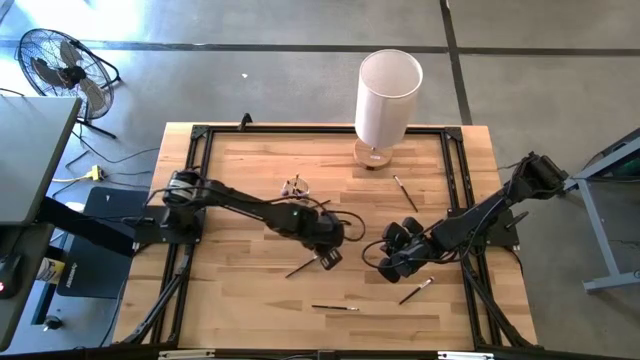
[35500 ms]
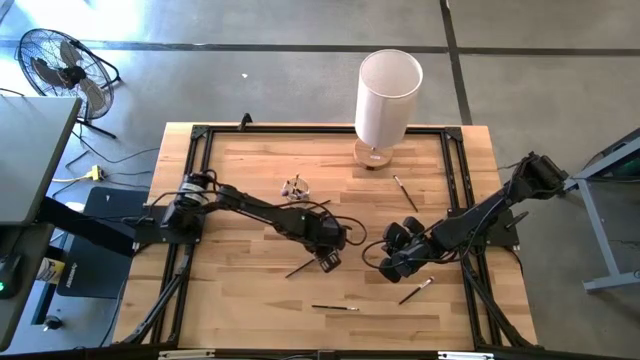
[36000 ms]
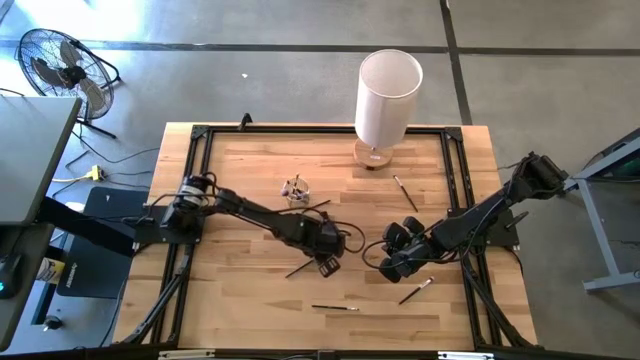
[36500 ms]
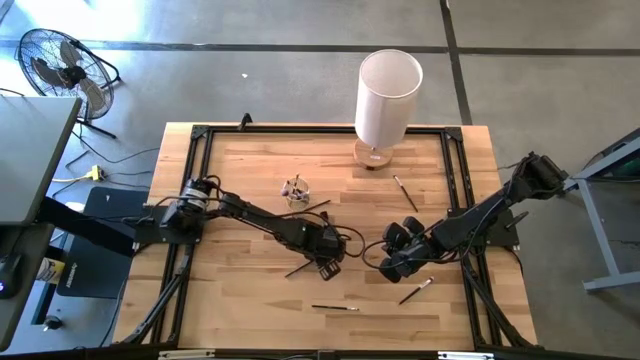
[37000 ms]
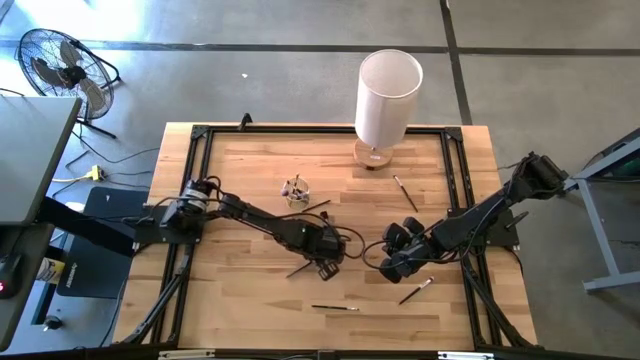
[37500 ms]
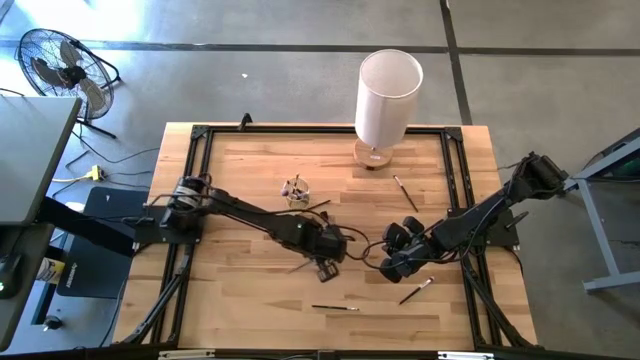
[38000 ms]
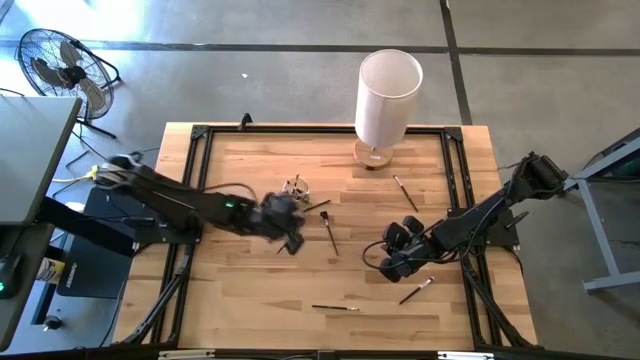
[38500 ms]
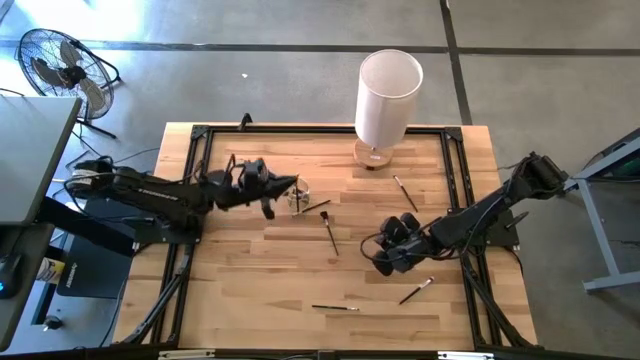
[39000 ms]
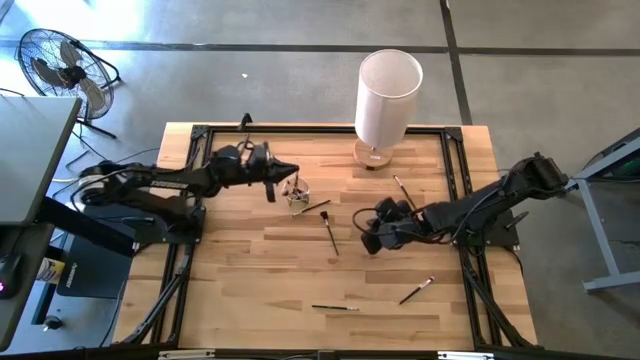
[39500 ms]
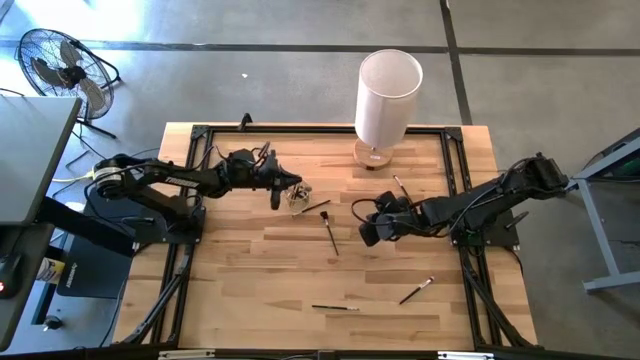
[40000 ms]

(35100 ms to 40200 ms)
Task: Put items in baskets/containers
Put the black liner brush into the yellow holder

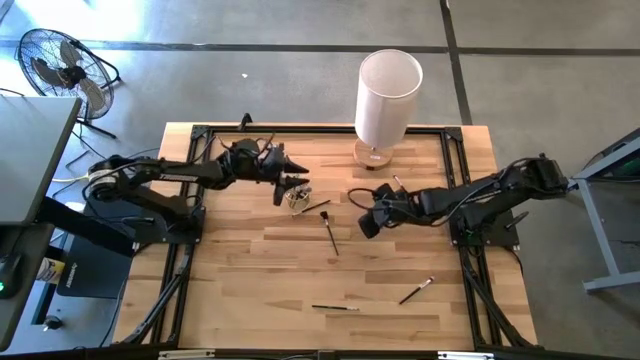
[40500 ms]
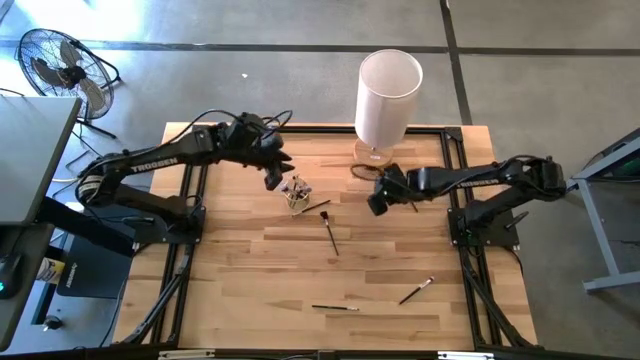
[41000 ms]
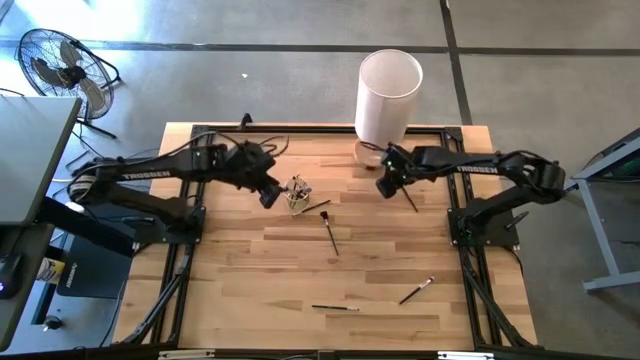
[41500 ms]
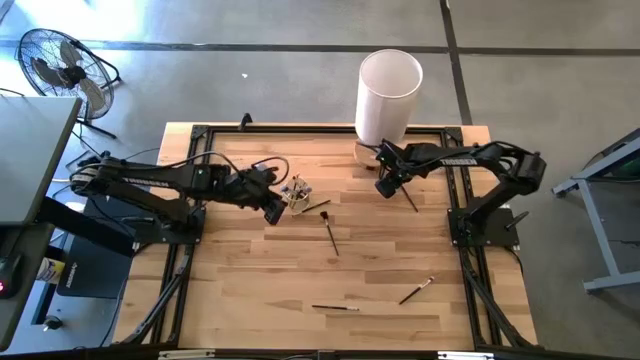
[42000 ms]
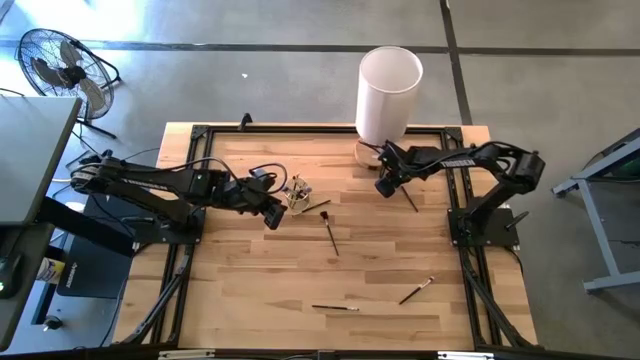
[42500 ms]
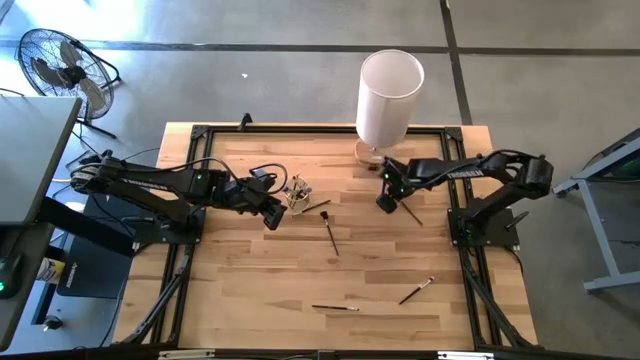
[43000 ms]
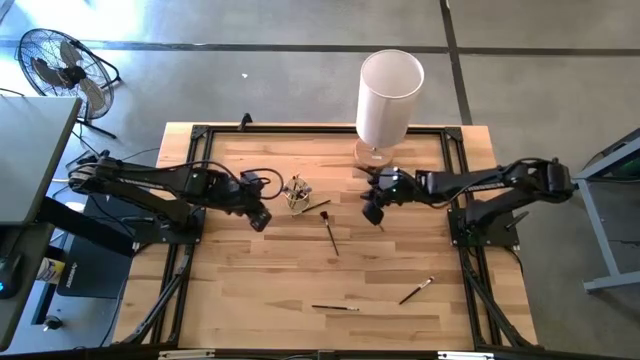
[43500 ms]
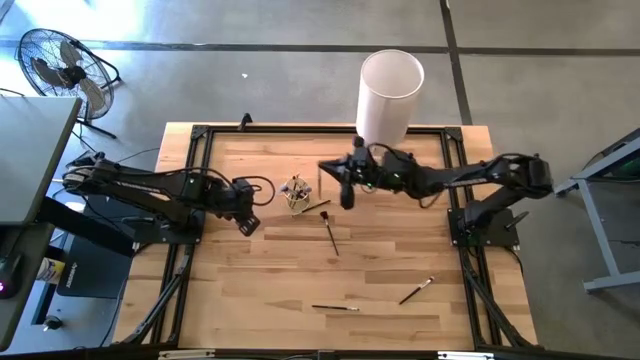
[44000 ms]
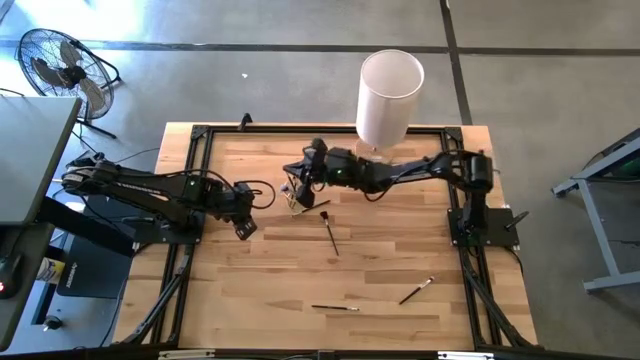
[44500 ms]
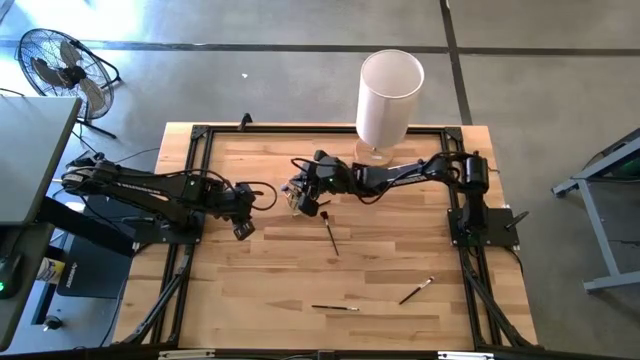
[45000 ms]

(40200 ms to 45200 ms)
Put the black eyeshadow brush into the yellow holder

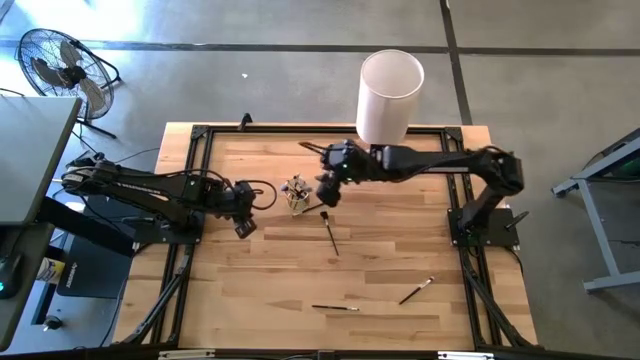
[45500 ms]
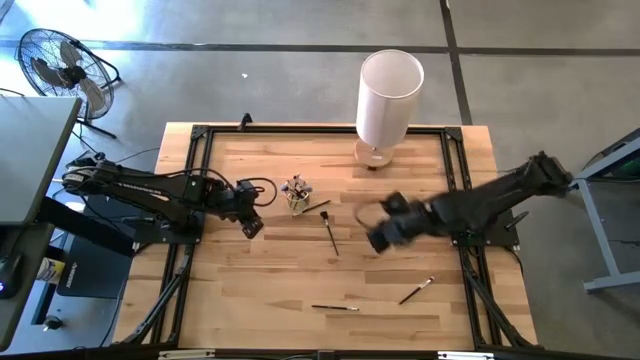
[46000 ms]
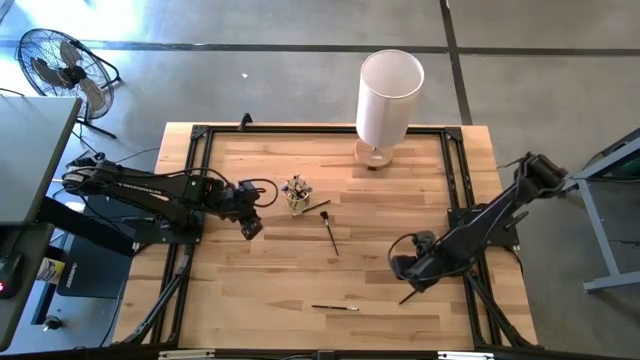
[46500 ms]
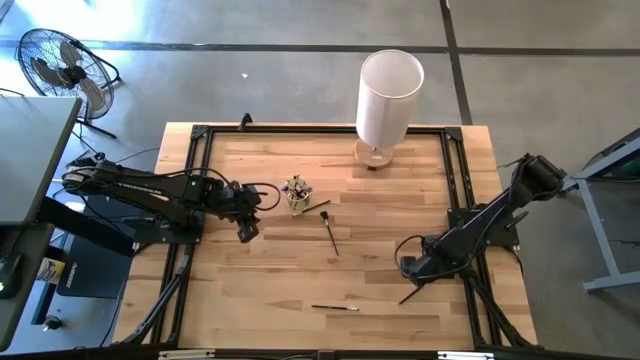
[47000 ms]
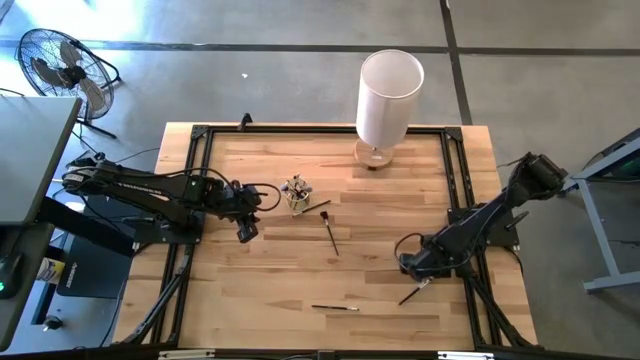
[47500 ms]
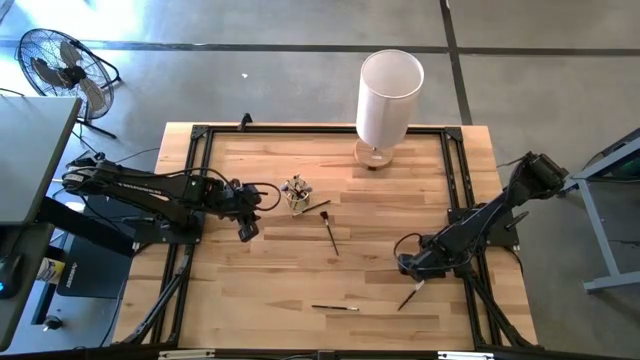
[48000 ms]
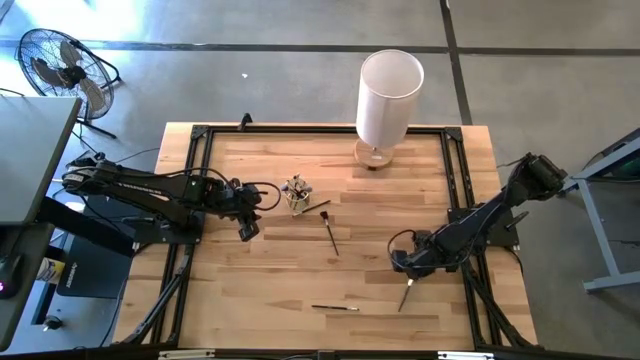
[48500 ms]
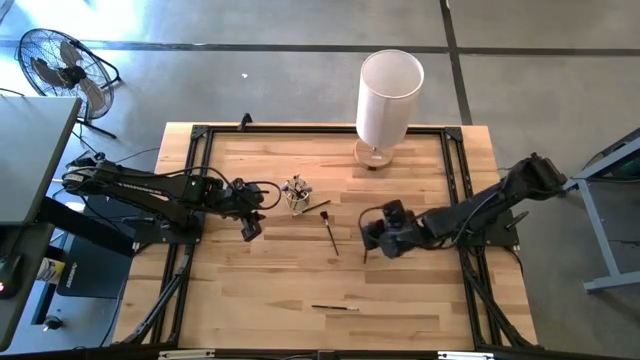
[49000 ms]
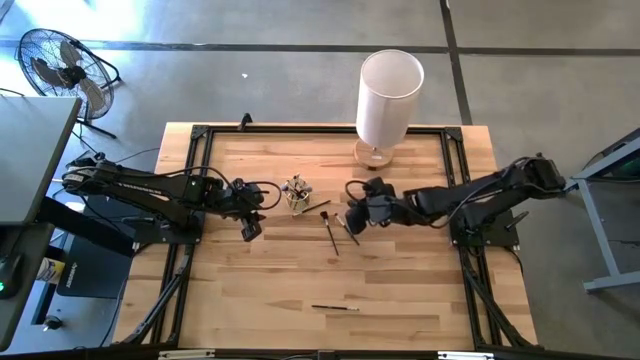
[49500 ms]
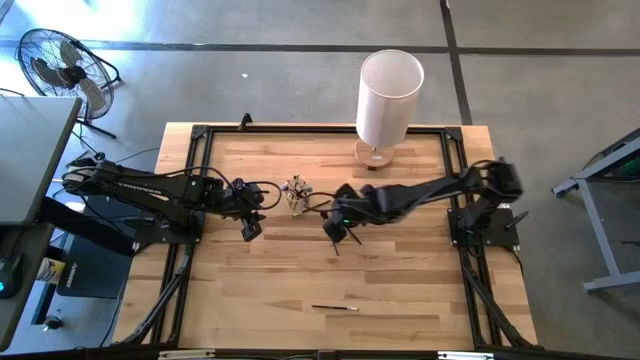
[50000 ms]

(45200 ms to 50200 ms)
Put the black foundation brush into the yellow holder

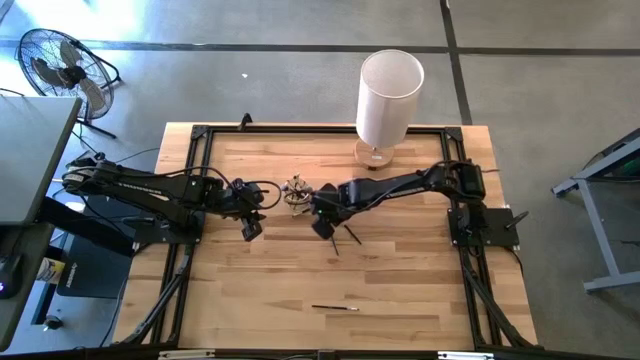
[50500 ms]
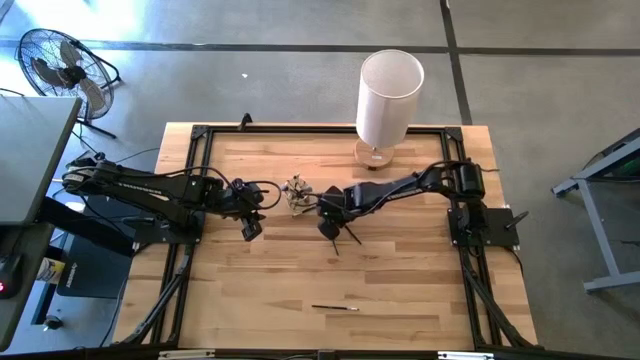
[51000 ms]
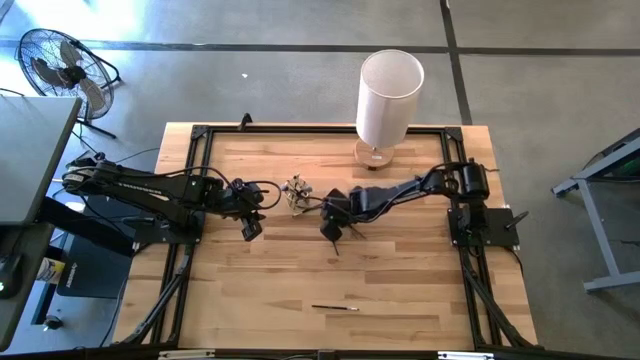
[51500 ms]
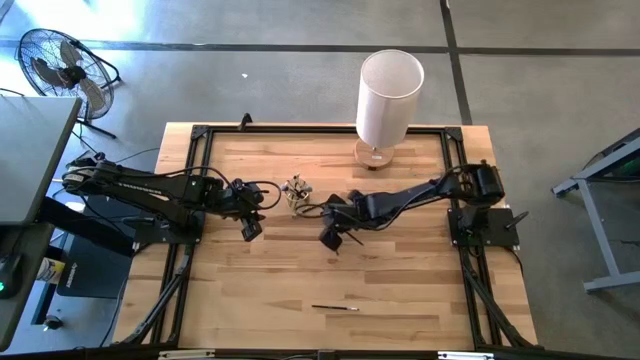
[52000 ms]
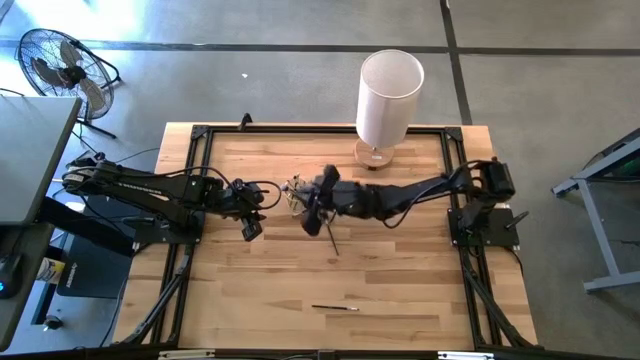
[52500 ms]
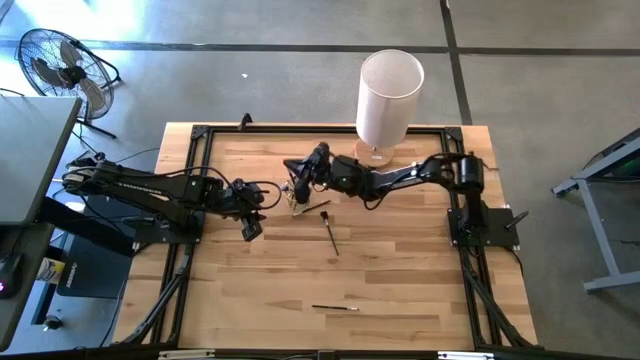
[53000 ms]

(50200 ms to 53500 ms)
Put the black foundation brush into the yellow holder

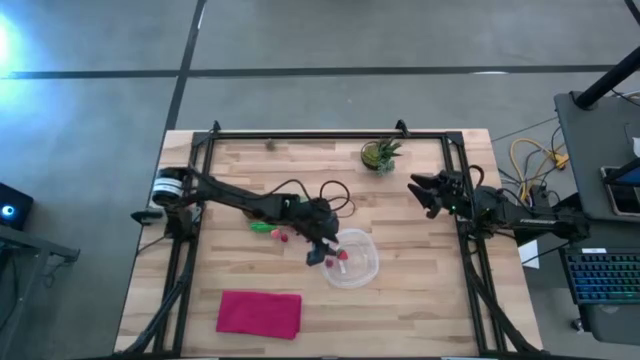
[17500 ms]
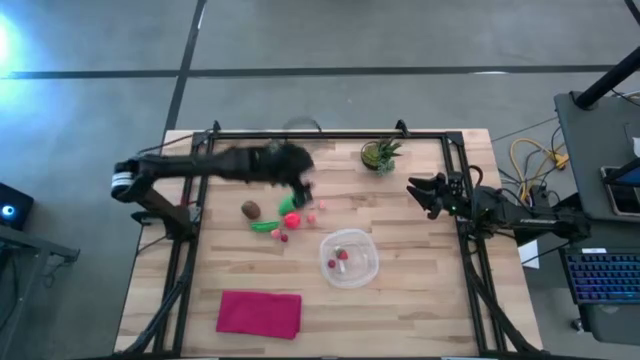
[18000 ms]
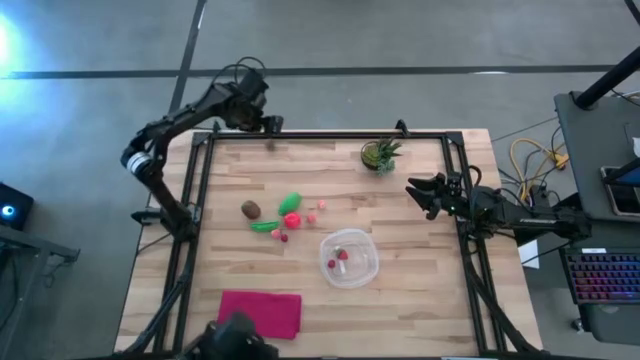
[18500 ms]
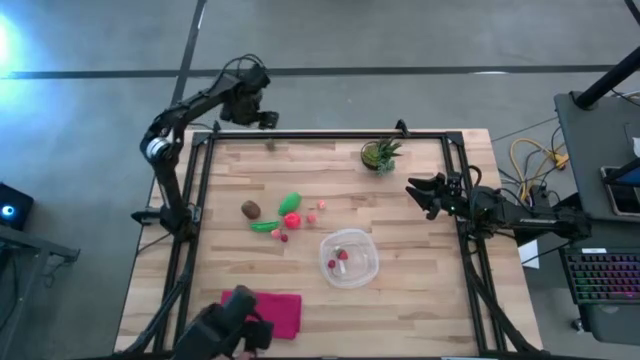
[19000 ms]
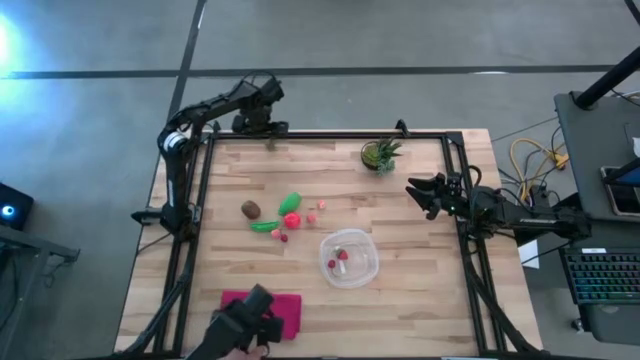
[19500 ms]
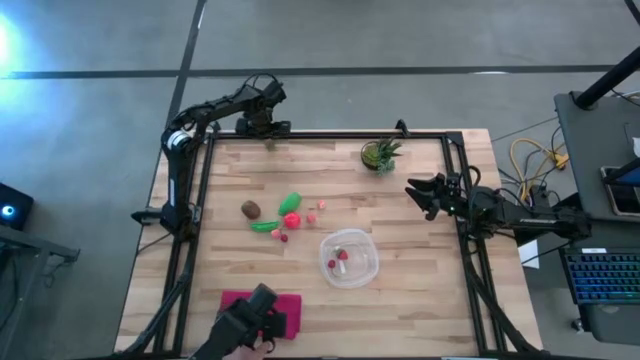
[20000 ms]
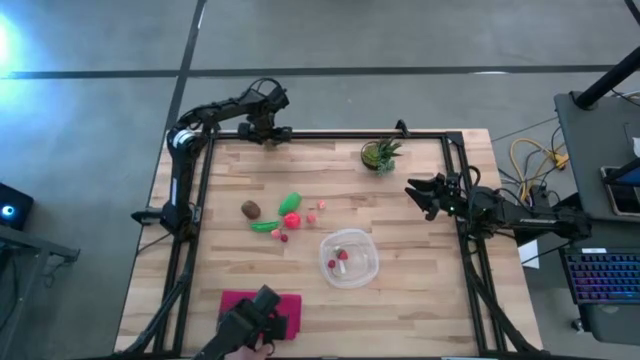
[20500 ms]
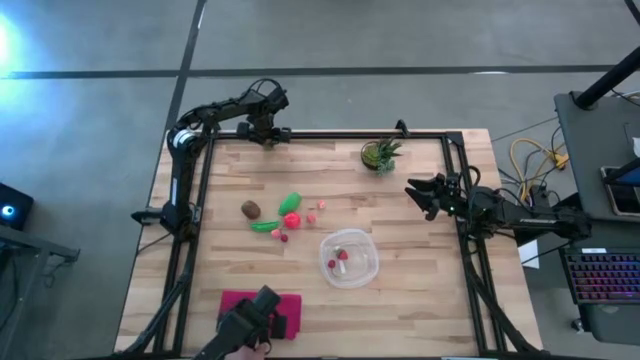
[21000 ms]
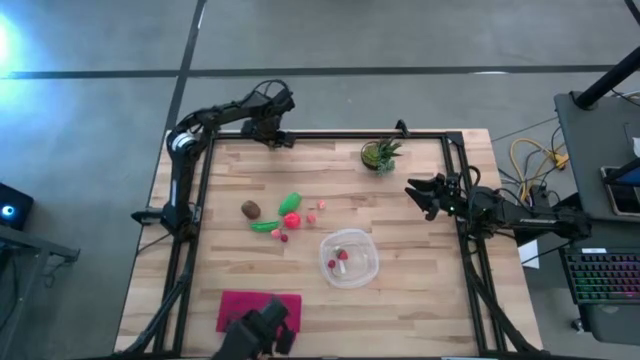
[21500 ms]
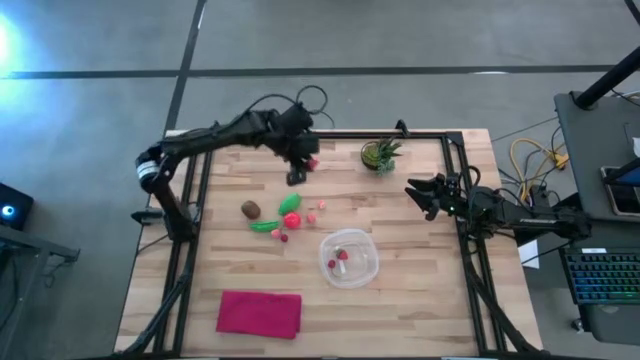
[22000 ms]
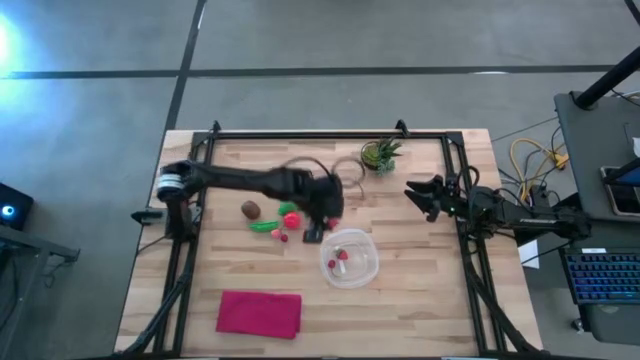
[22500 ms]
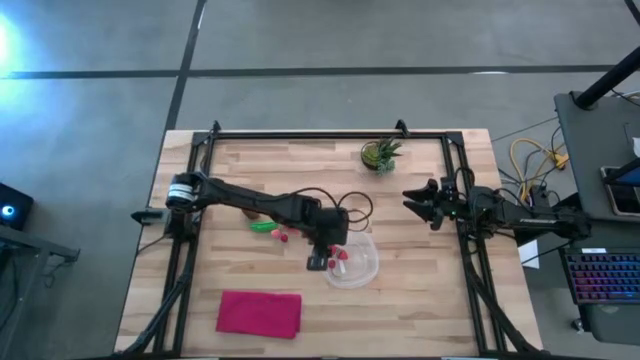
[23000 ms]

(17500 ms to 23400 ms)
Task: Pick and placing Produce into tupperware
Put the strawberry into the container
